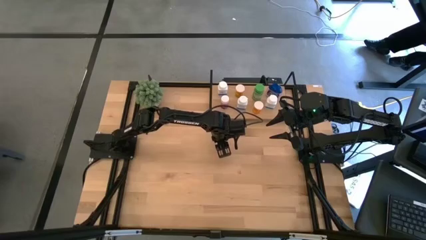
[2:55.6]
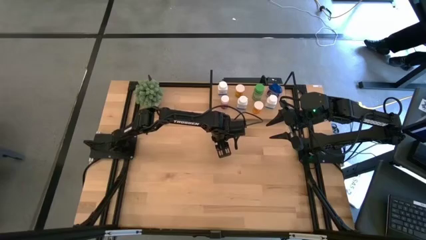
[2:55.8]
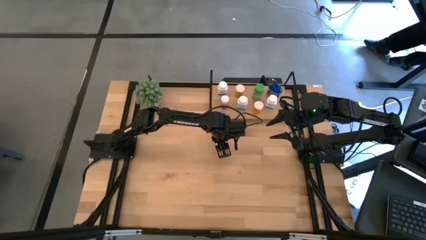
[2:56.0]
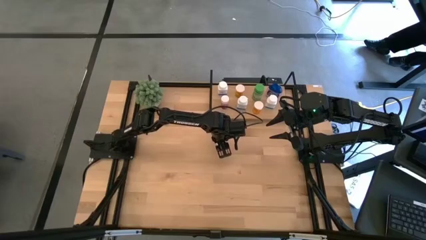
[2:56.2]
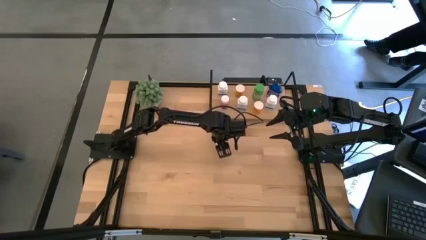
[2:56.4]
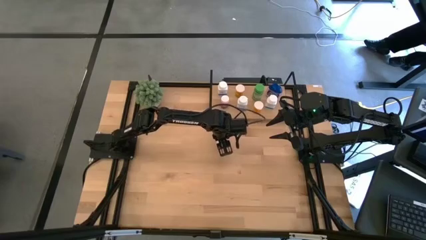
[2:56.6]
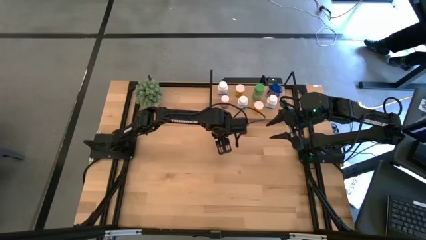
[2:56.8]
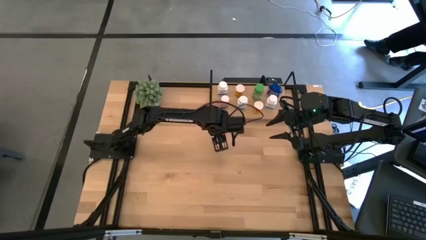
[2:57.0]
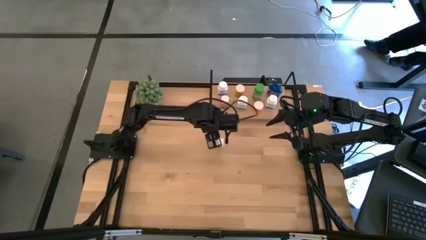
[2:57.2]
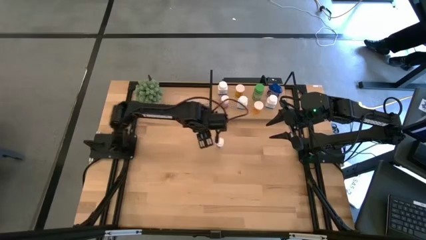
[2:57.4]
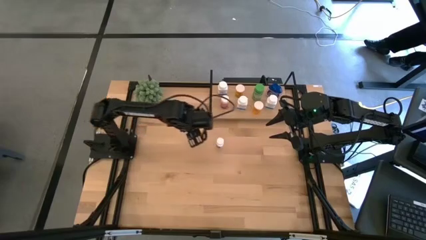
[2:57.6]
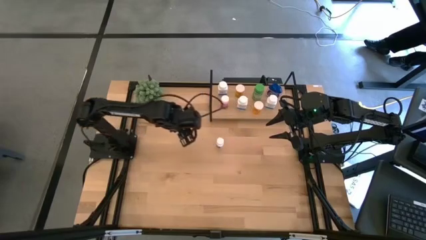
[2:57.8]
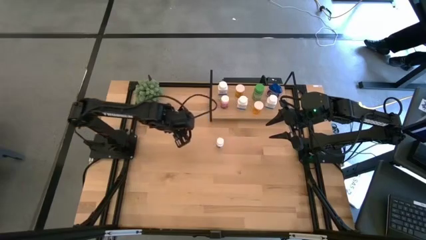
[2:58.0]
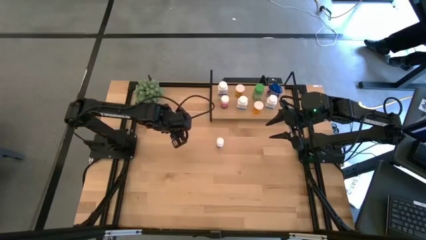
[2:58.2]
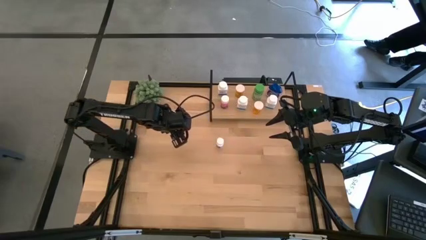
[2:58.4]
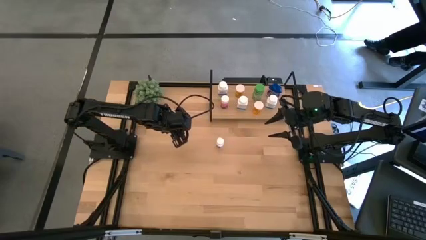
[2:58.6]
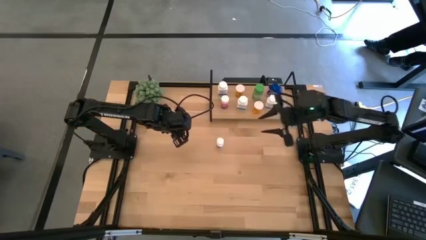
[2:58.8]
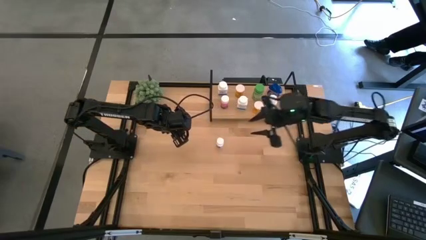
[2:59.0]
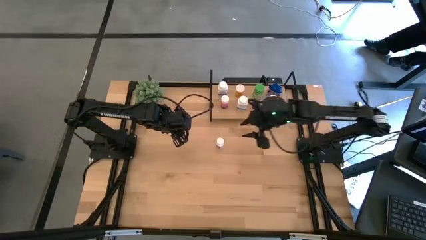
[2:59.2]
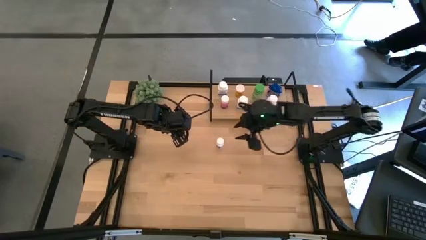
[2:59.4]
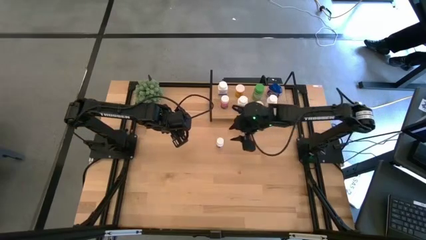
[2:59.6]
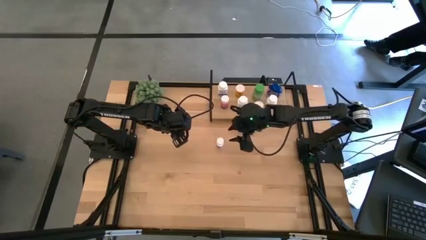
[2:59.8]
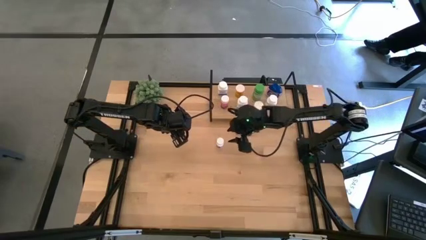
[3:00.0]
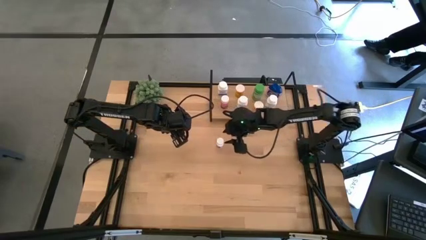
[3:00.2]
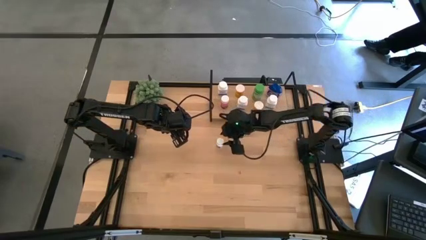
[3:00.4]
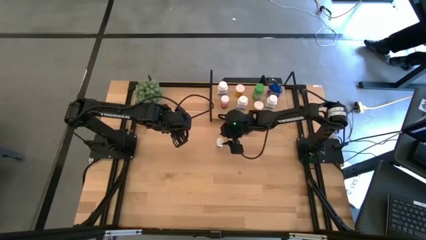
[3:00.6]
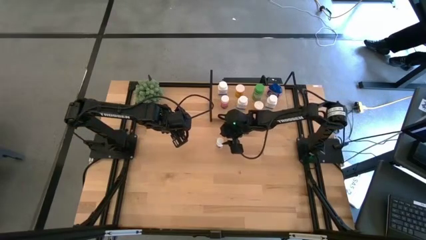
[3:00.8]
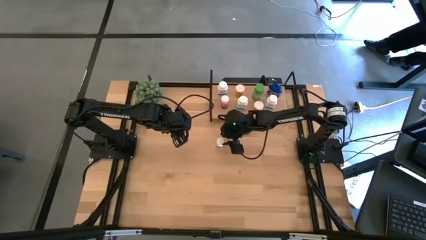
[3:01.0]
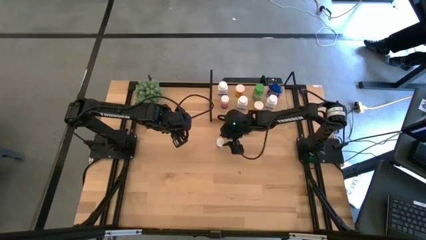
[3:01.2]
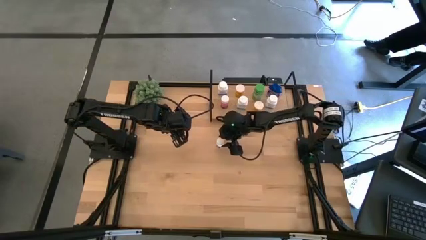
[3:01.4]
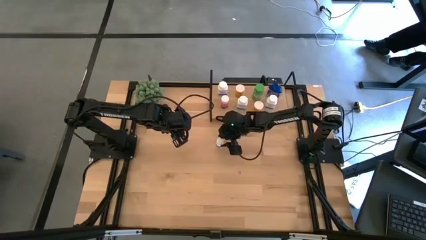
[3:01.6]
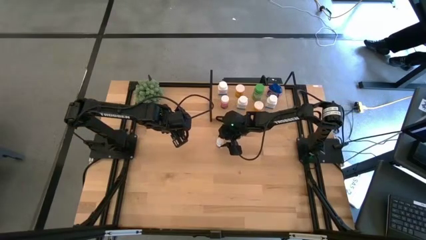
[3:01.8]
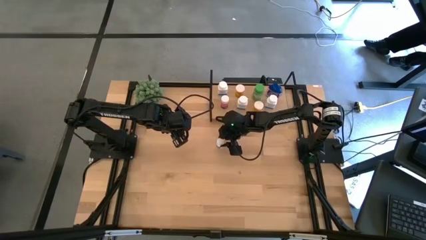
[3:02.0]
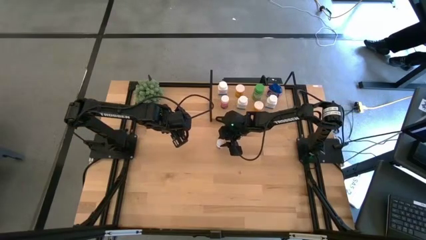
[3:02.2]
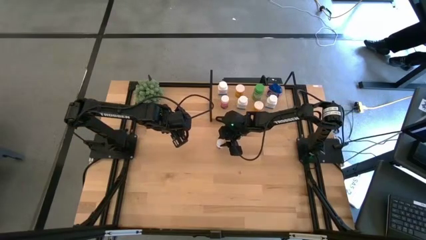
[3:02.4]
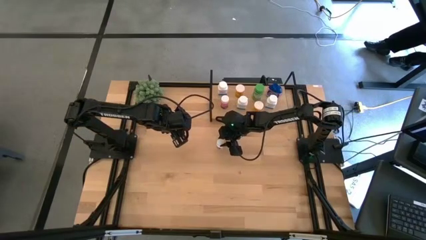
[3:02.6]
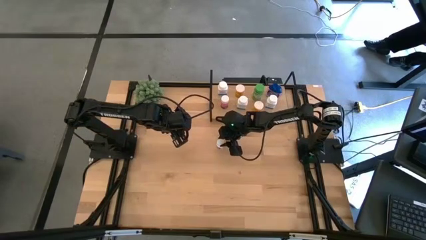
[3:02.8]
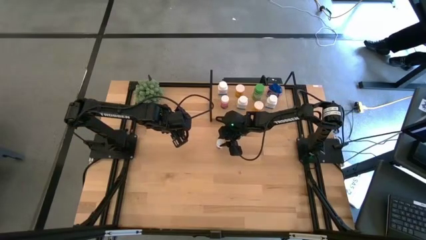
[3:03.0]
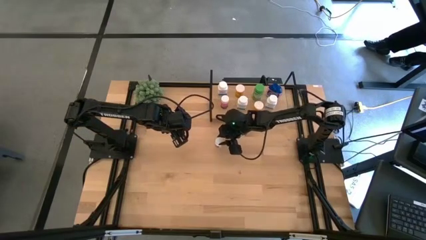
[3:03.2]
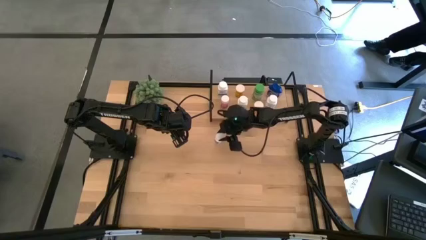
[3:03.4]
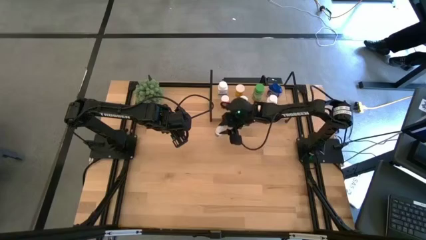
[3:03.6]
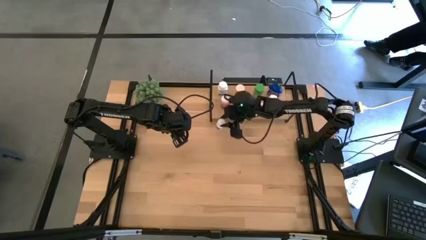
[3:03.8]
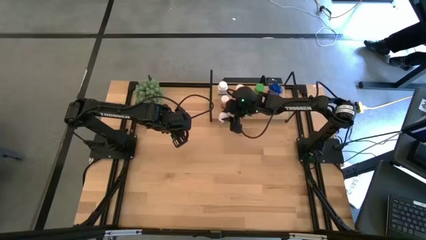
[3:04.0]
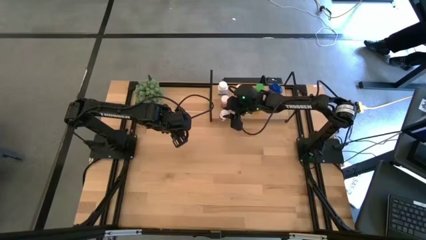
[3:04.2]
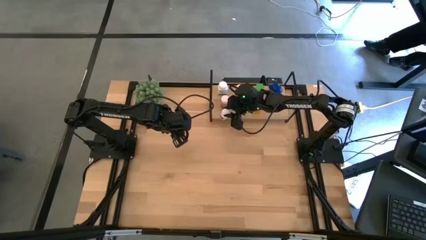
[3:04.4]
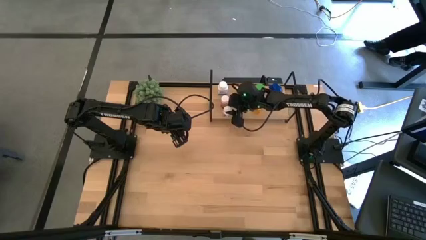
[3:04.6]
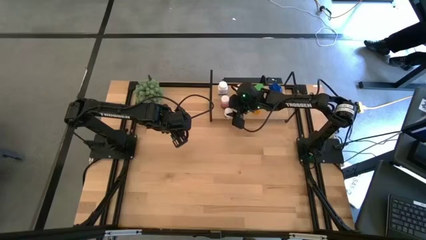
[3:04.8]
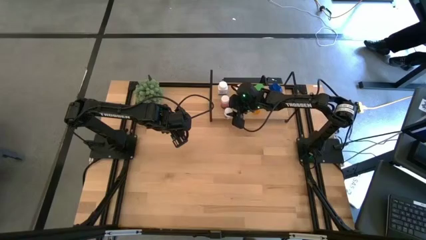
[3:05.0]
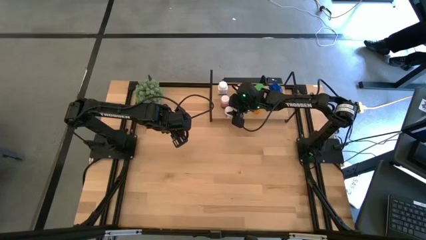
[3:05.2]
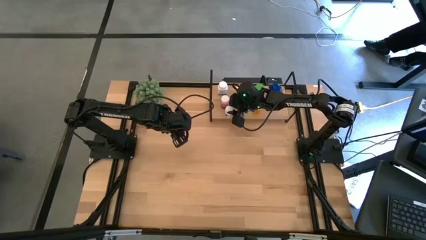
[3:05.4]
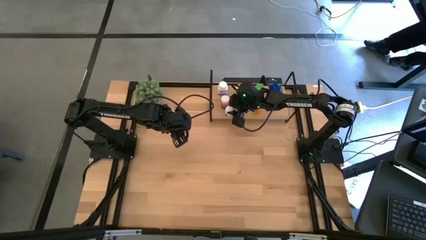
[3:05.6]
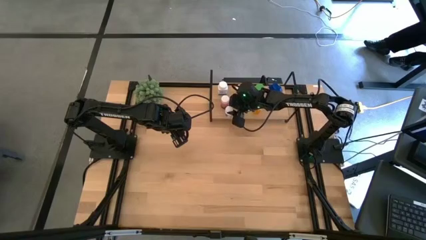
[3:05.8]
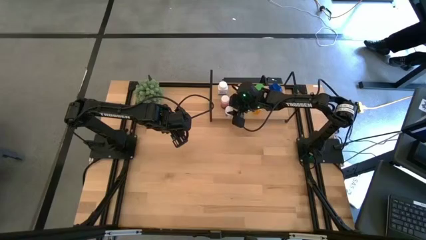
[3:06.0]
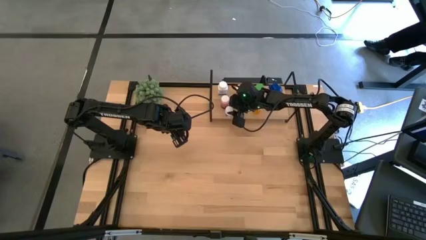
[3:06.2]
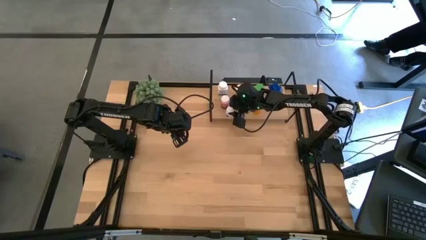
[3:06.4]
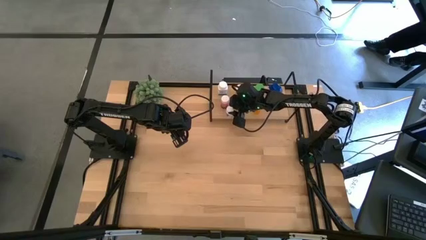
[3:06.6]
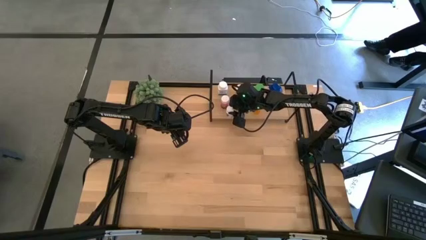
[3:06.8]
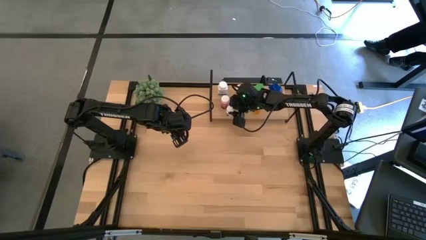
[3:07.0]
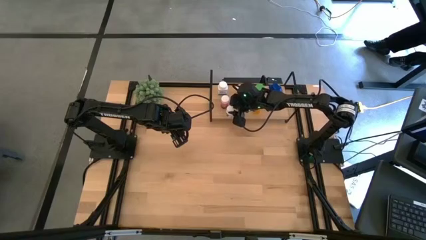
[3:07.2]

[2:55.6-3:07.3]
Task: Pick and place medicine bottles onto shelf by color
Put the white medicine bottle on the shelf

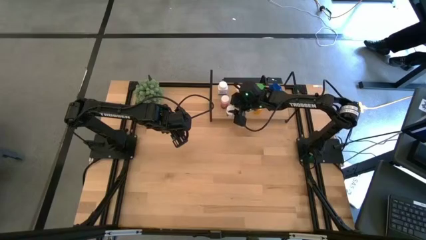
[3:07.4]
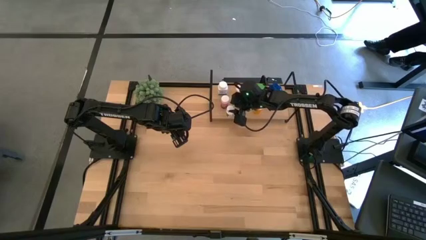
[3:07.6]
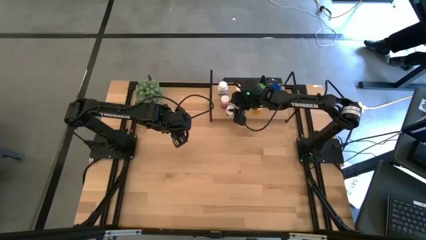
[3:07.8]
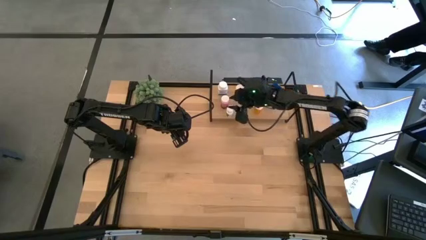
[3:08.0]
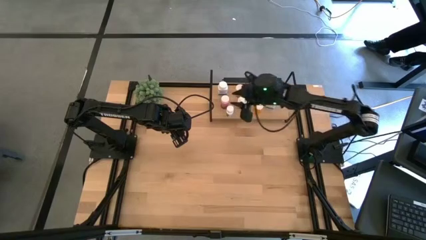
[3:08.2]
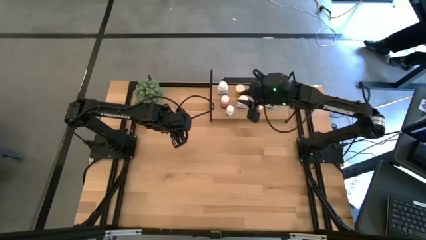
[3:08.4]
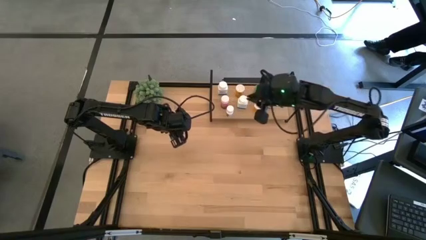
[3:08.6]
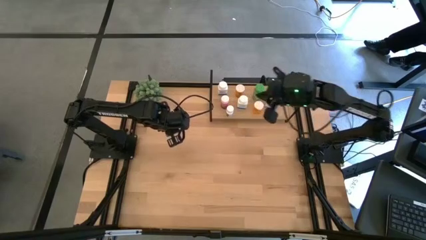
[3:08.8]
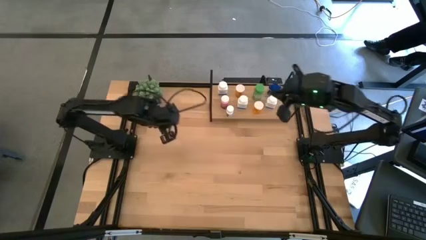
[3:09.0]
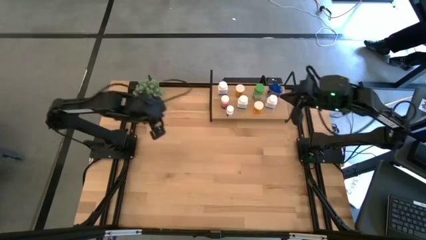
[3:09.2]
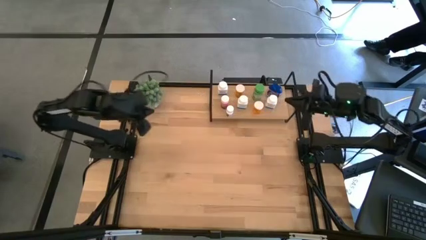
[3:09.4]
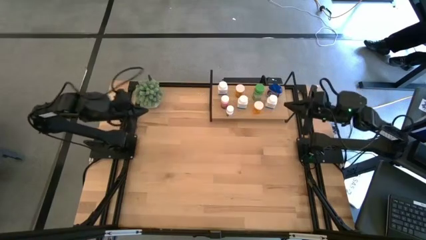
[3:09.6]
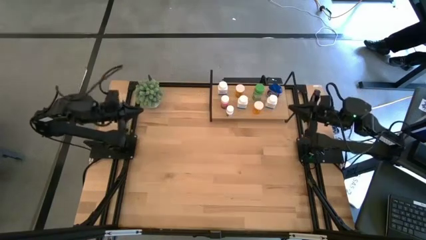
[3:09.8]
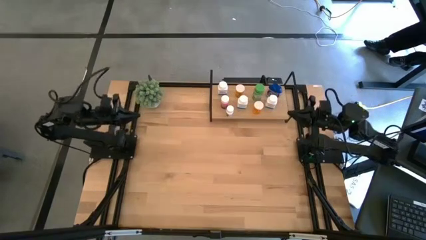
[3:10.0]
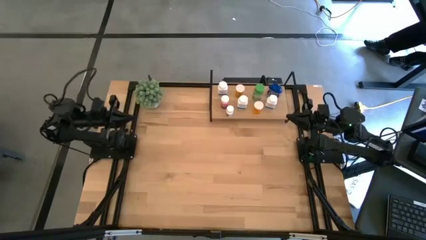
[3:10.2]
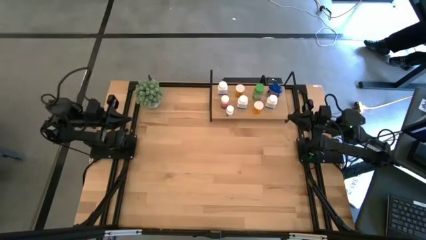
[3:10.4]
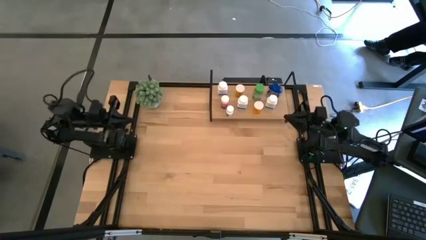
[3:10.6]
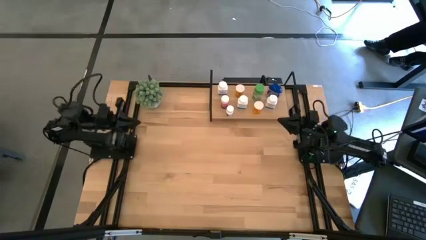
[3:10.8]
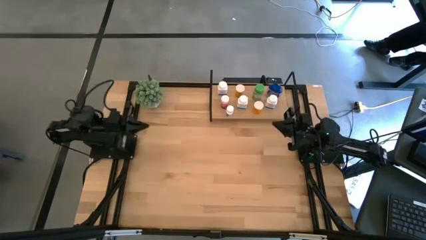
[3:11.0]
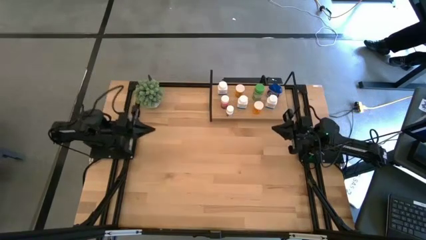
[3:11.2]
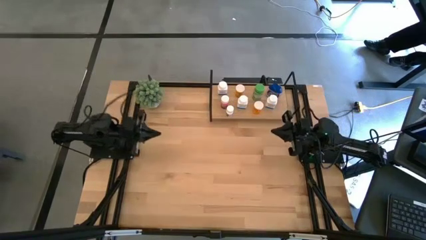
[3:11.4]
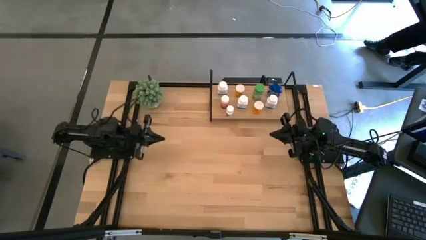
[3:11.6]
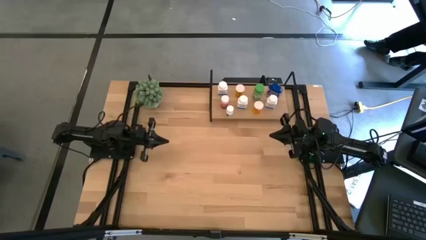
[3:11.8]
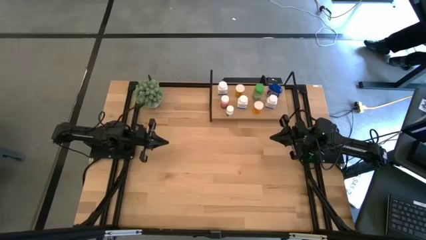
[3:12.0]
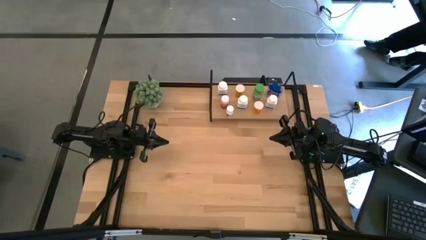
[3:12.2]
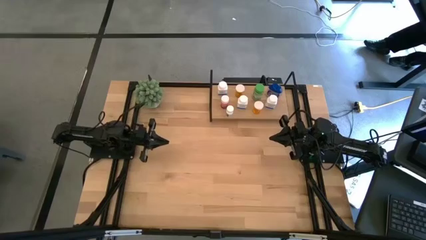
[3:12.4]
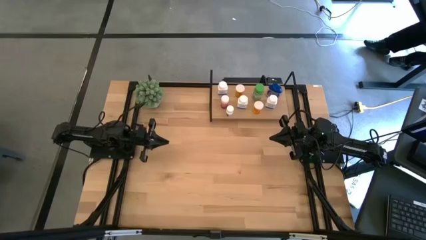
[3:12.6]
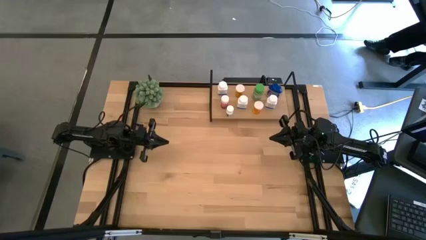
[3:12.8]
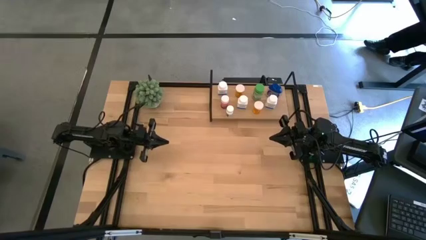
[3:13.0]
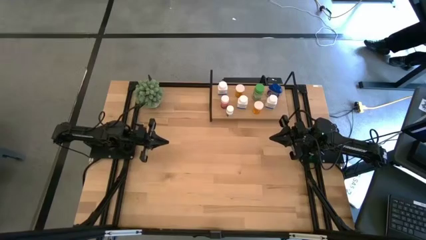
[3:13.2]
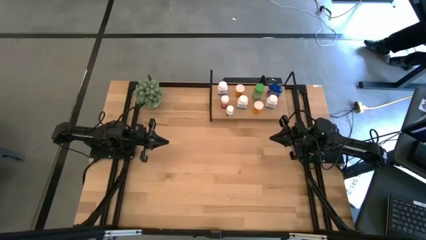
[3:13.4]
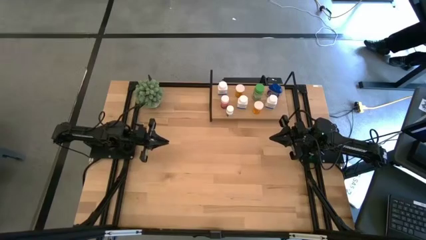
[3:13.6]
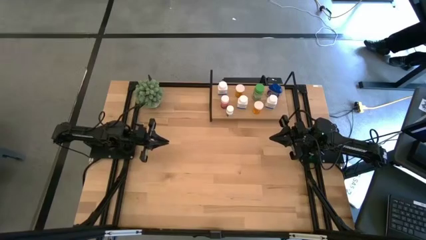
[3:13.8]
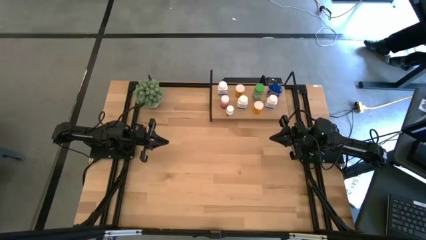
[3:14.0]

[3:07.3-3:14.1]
Return to Home Position
